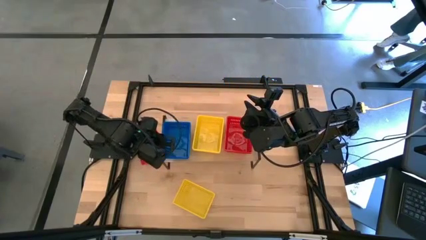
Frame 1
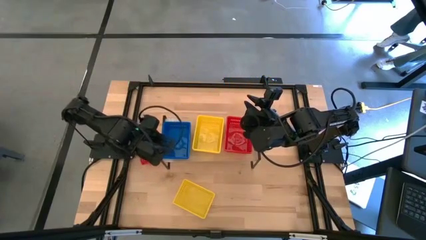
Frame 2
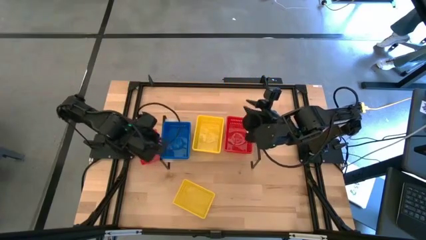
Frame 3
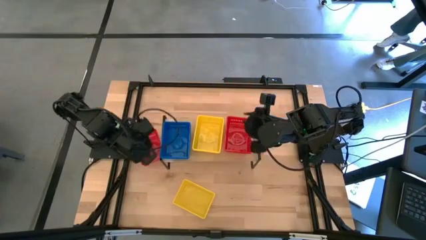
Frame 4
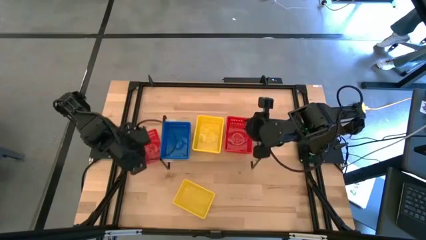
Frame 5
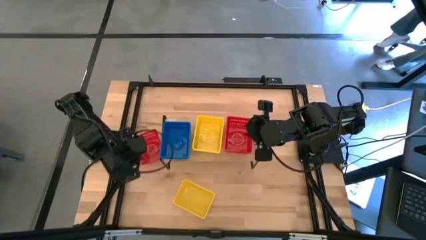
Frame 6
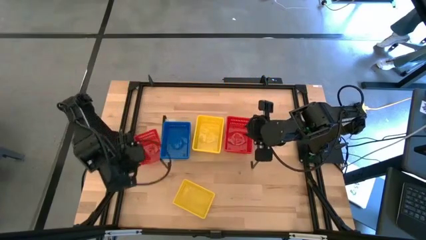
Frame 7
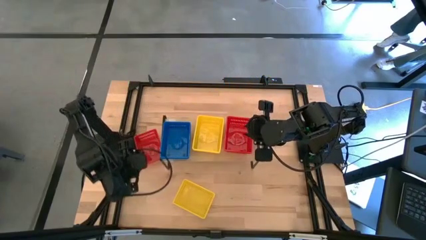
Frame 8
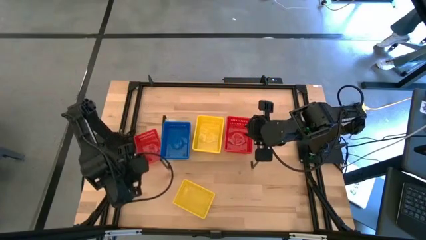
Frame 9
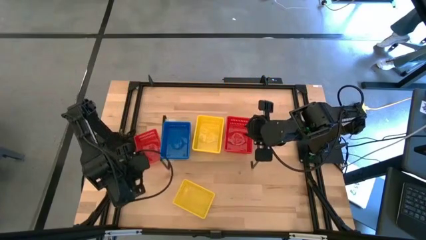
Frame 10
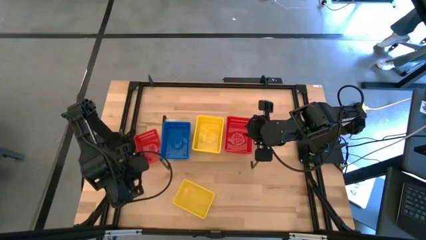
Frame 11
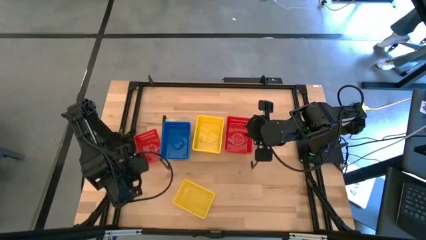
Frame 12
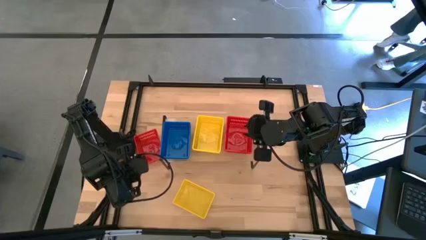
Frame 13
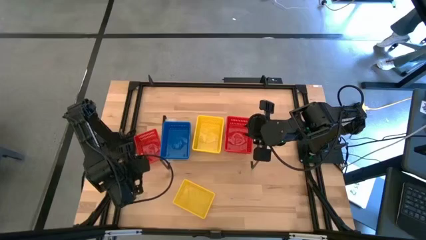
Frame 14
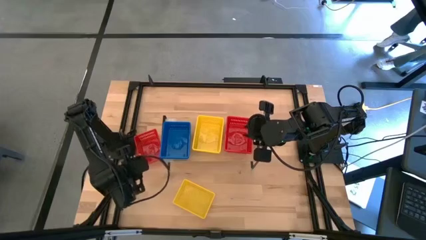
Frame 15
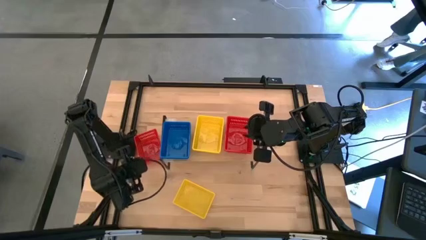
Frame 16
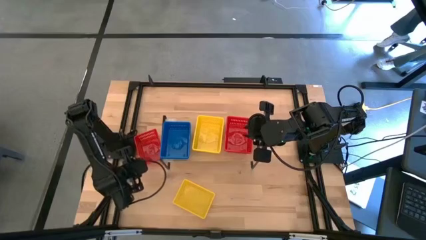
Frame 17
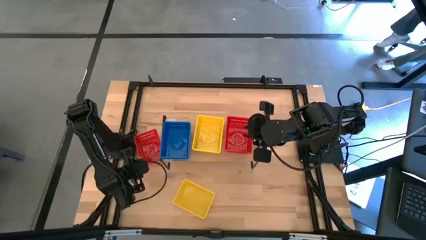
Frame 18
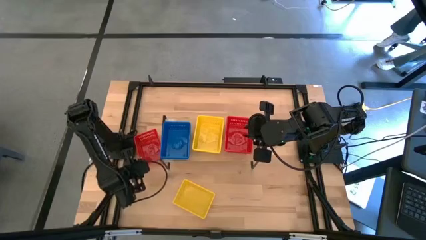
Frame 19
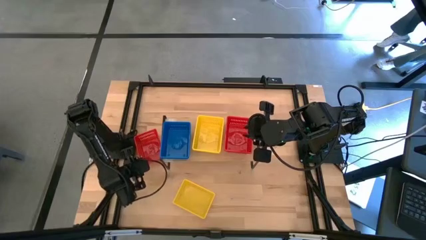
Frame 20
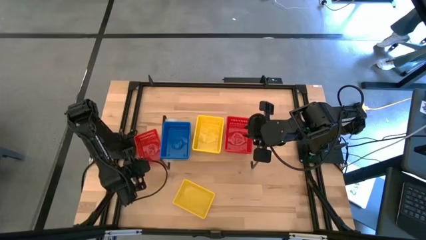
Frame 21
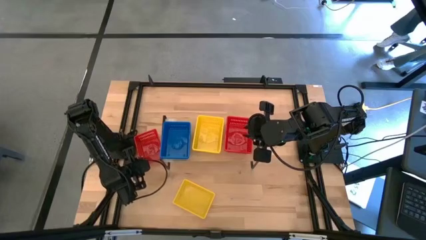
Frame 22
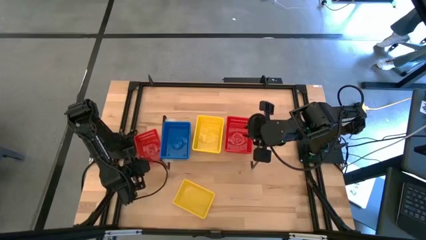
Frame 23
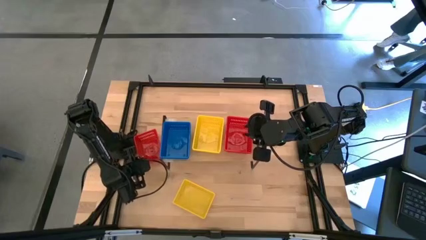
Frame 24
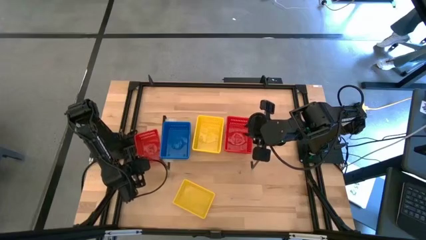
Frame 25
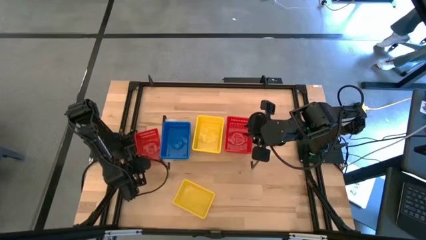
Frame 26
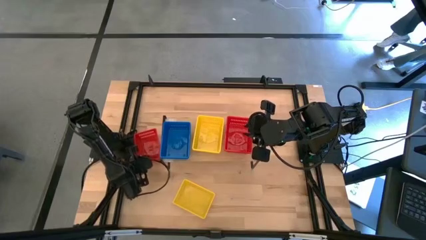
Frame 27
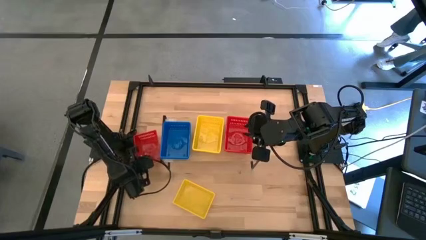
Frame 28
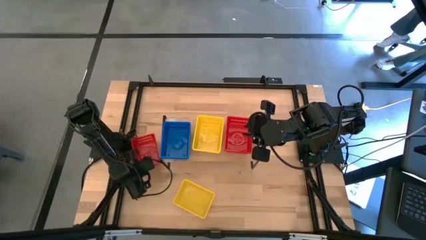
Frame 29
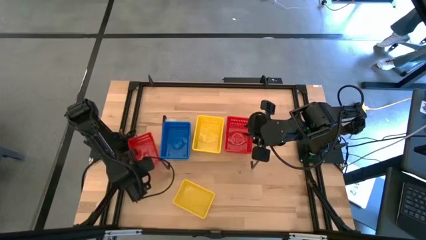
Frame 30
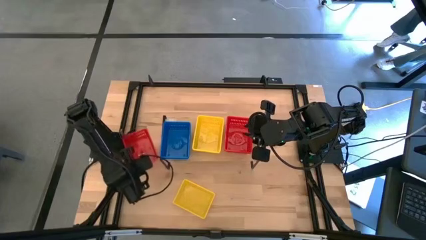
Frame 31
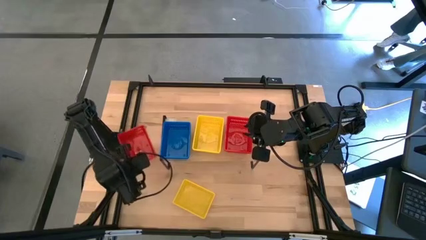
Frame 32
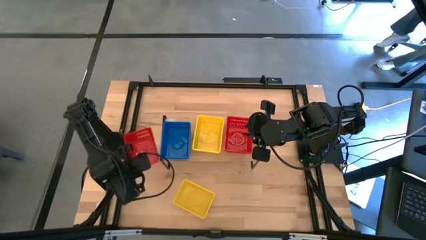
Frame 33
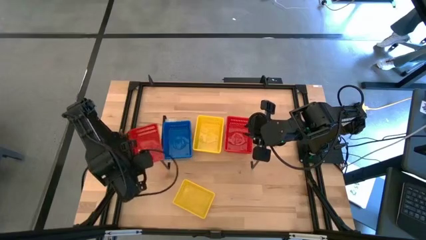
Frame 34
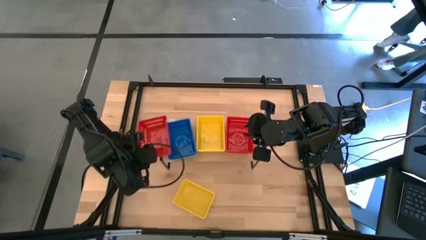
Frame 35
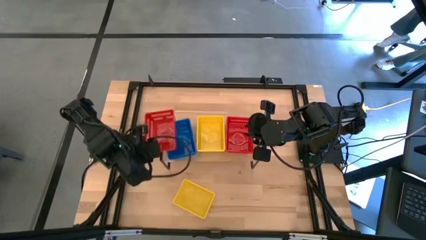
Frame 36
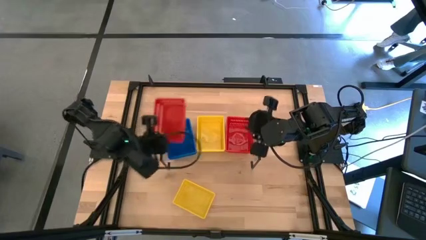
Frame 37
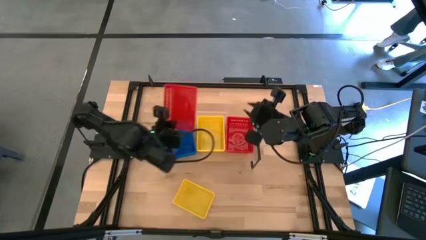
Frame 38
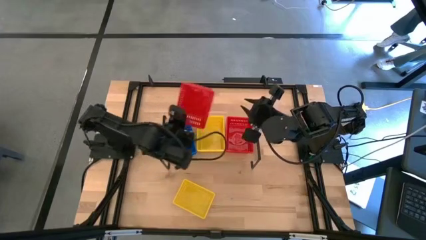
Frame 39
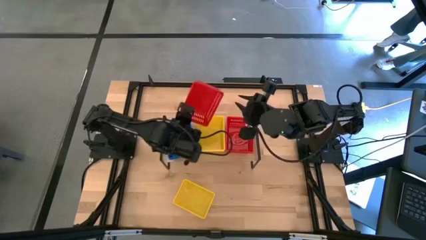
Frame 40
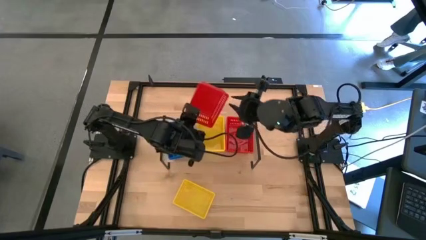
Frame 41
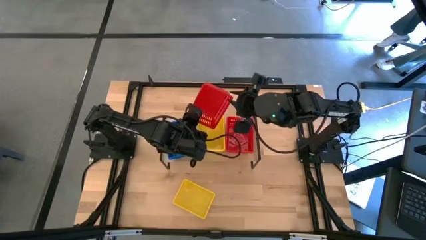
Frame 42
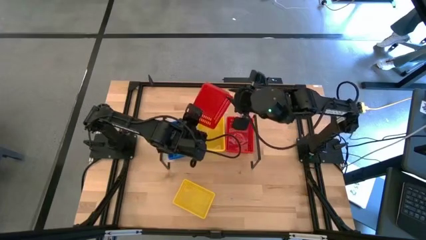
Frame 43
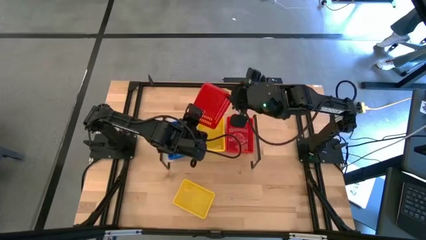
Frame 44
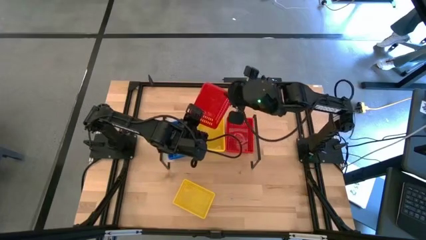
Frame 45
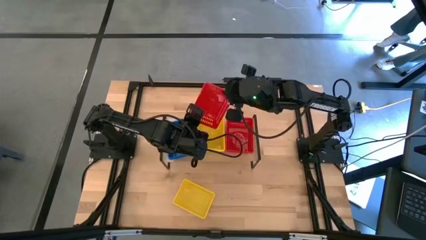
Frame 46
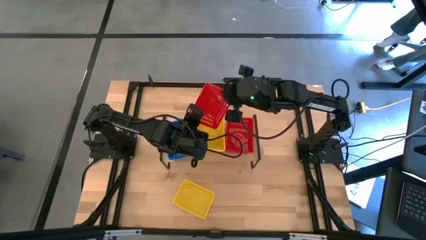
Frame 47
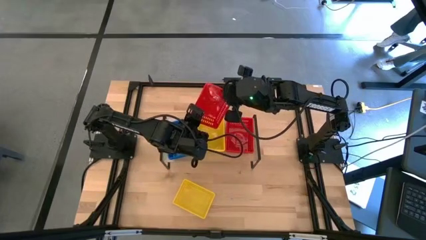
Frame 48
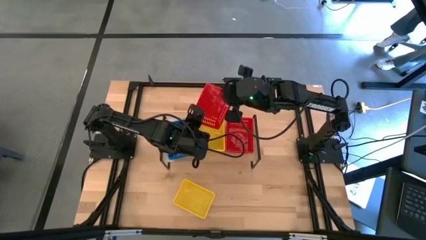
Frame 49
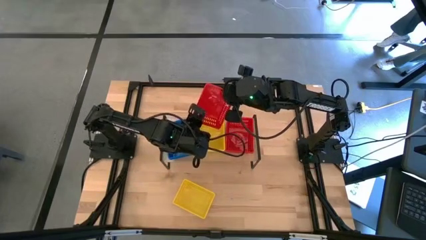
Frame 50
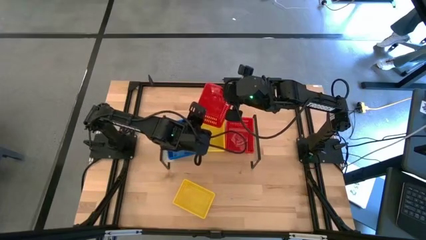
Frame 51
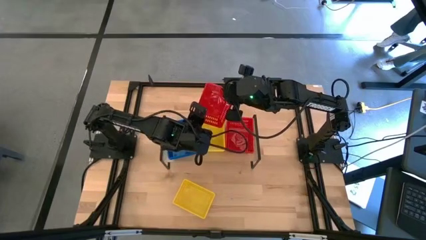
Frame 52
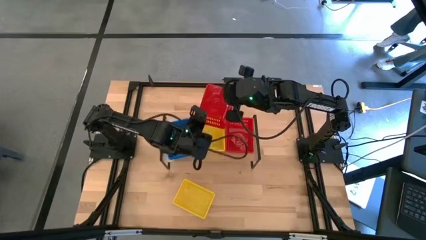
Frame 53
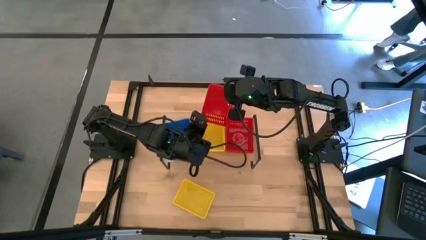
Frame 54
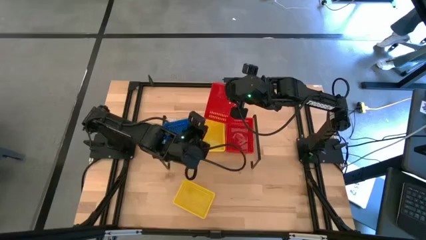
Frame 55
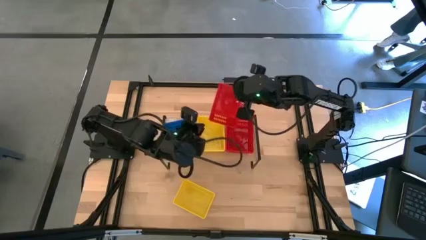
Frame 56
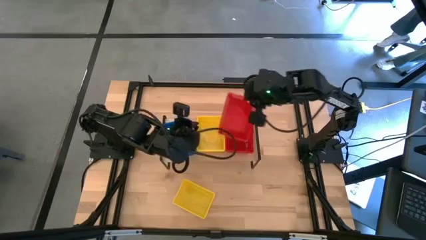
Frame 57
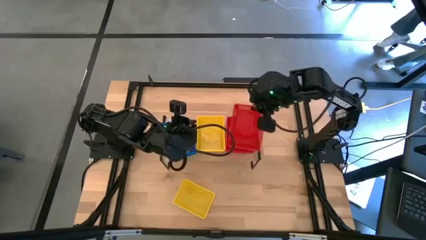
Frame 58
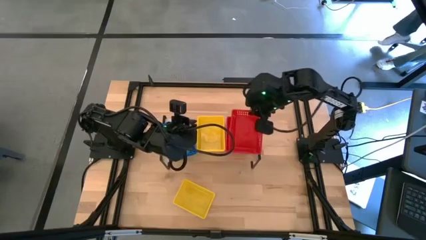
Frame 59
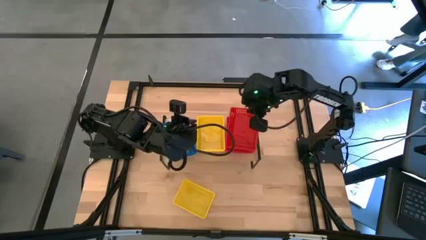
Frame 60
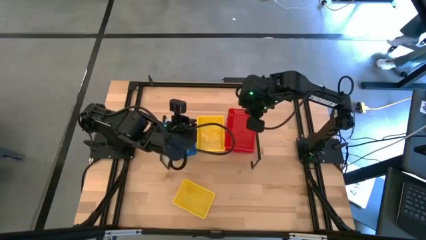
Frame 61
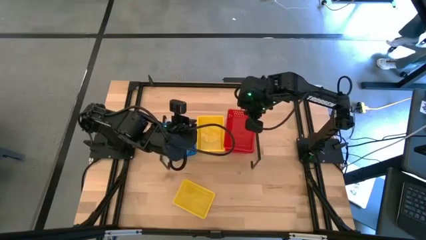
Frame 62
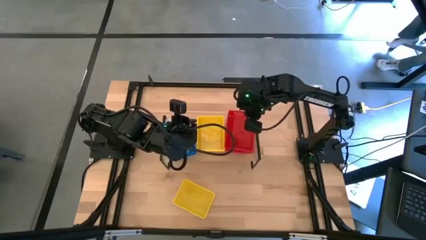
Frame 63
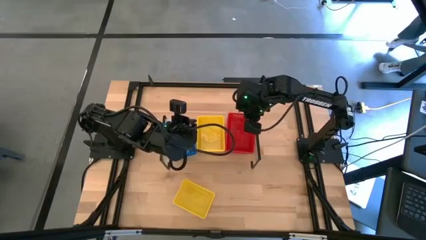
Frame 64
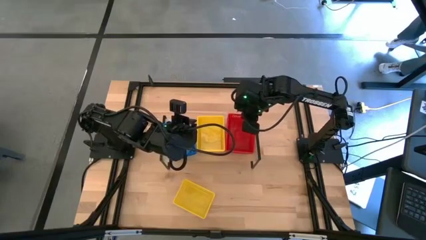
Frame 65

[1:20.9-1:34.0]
Task: Stack baskets on shelf by color
Stack the red bin on top of the stacked red bins on the shelf
